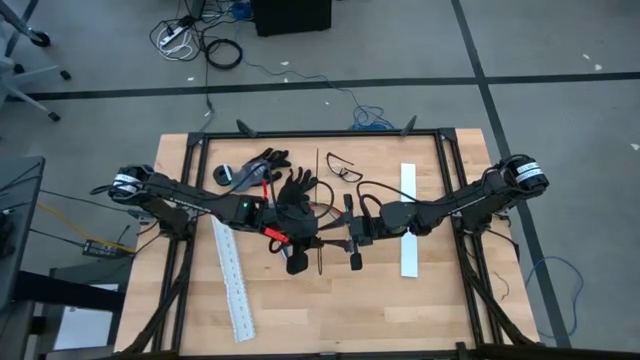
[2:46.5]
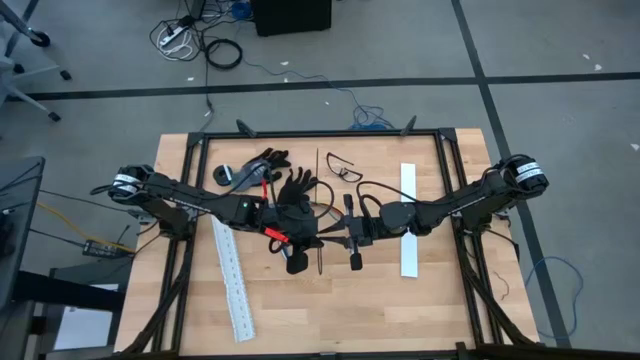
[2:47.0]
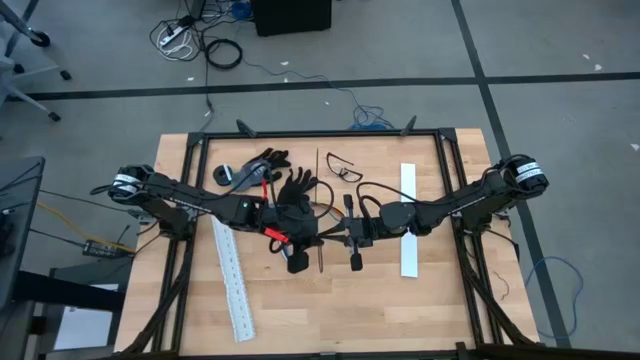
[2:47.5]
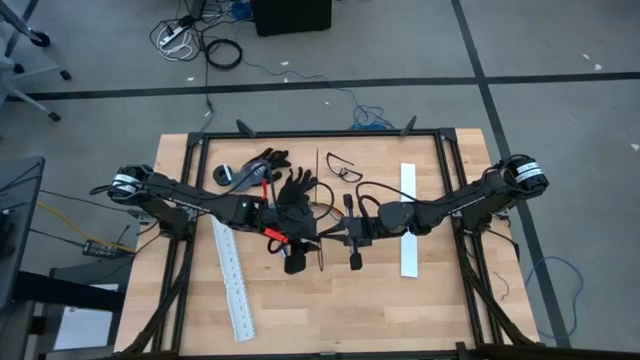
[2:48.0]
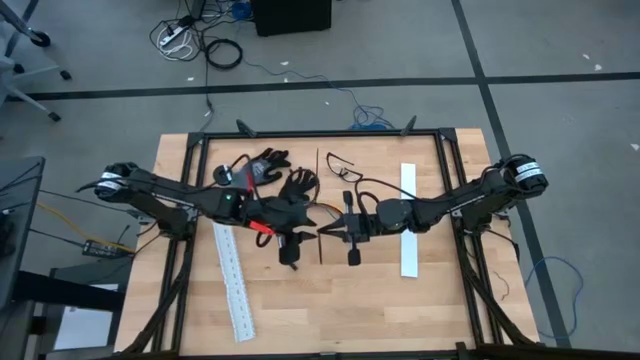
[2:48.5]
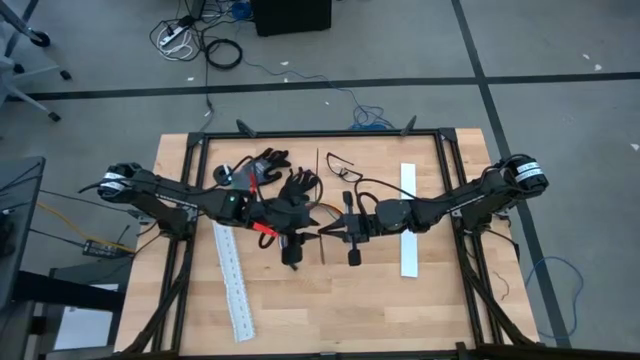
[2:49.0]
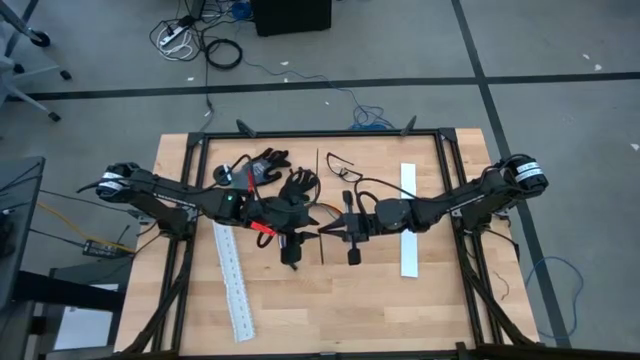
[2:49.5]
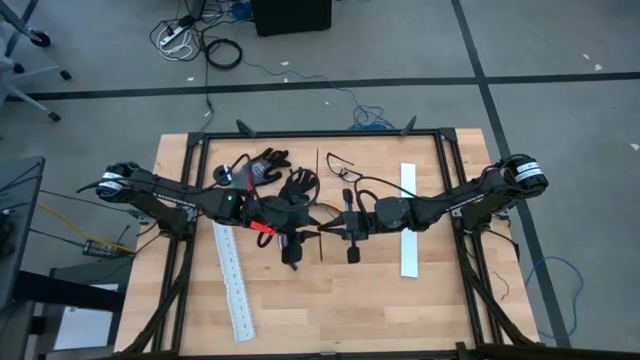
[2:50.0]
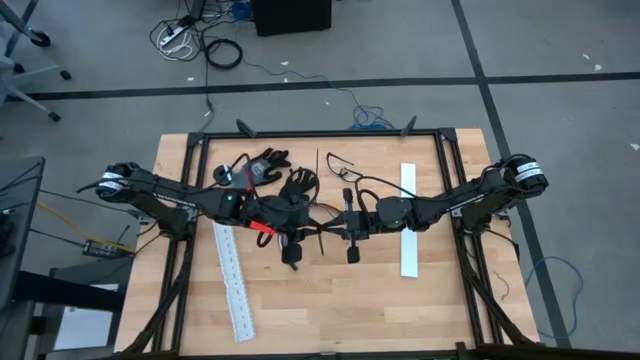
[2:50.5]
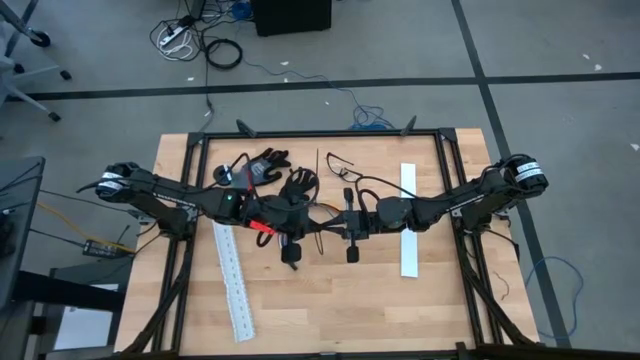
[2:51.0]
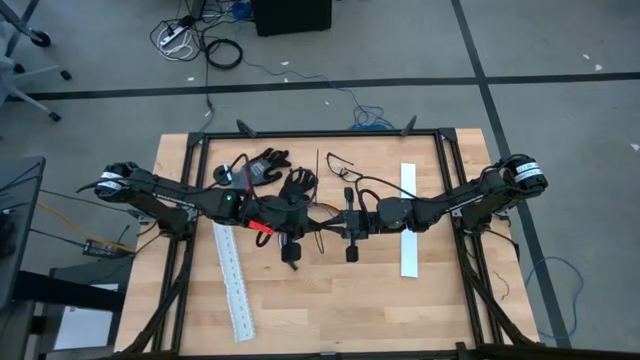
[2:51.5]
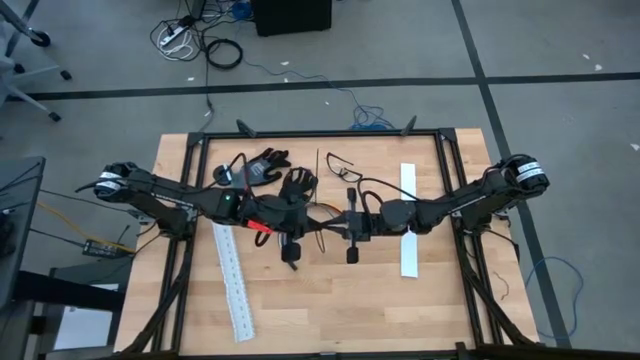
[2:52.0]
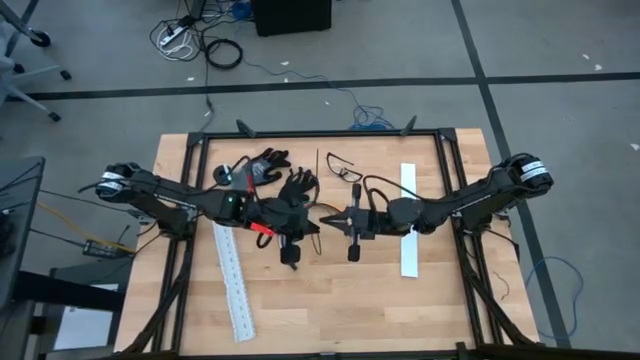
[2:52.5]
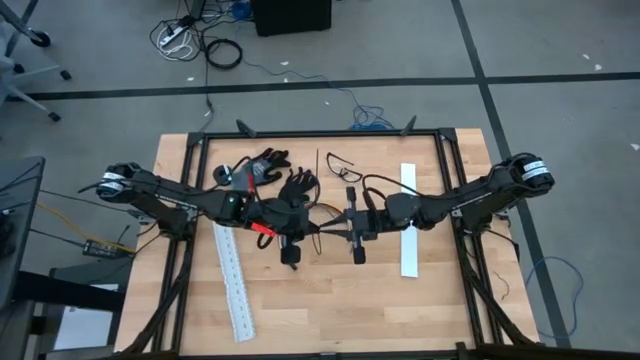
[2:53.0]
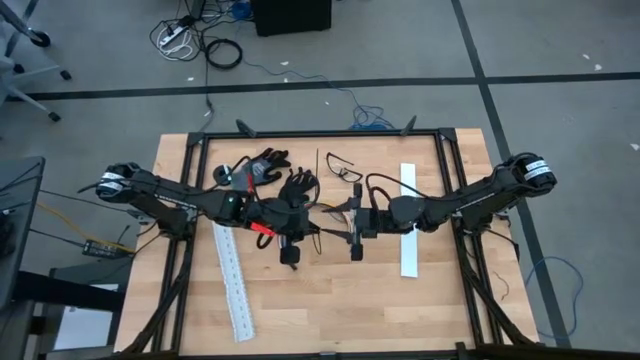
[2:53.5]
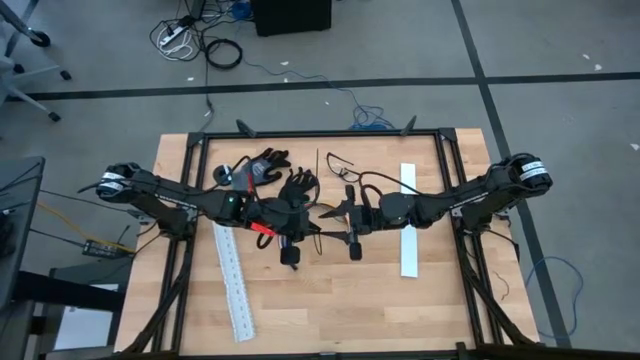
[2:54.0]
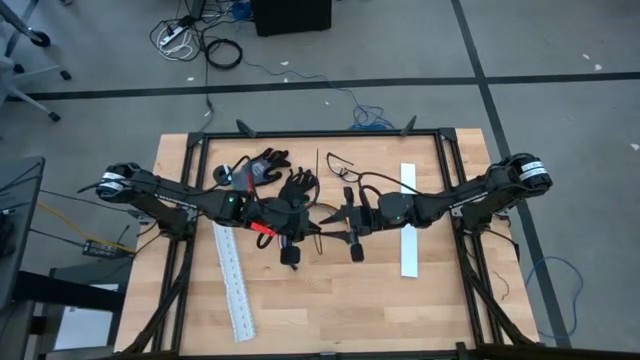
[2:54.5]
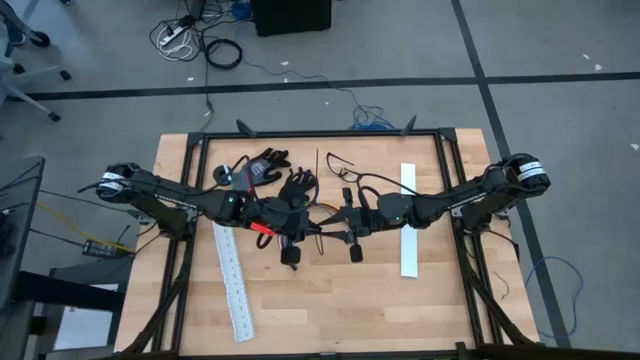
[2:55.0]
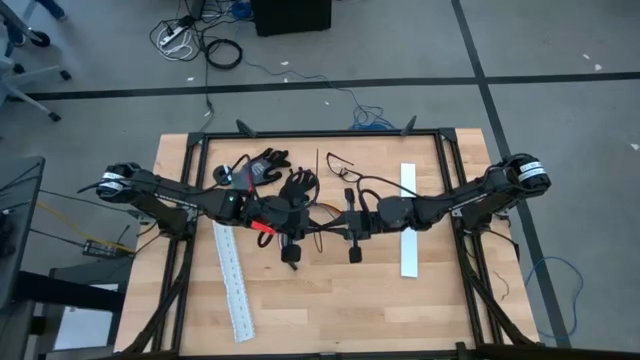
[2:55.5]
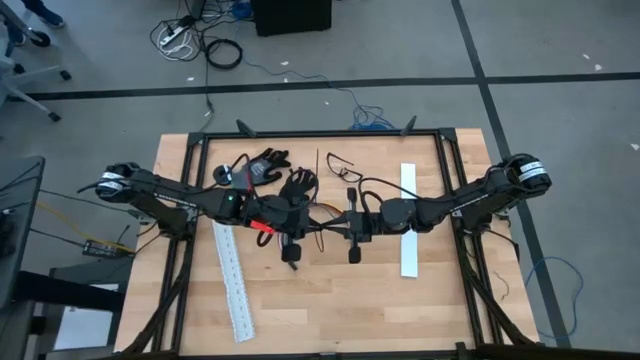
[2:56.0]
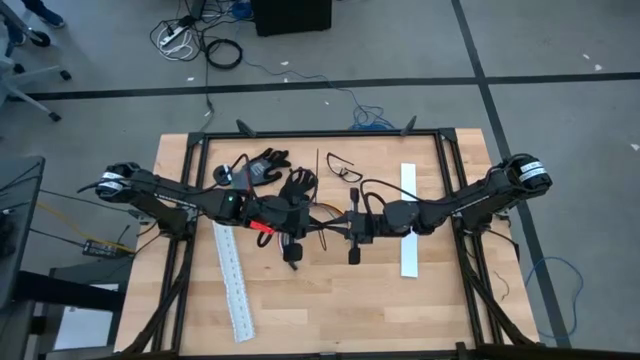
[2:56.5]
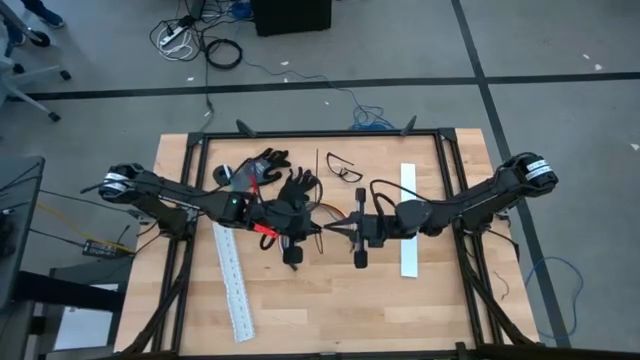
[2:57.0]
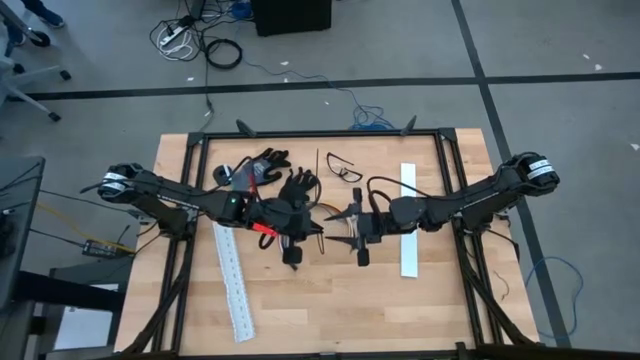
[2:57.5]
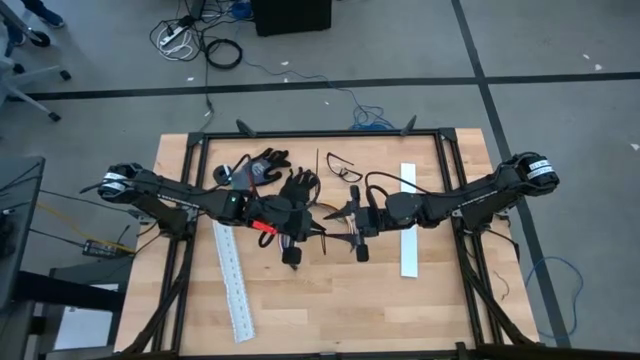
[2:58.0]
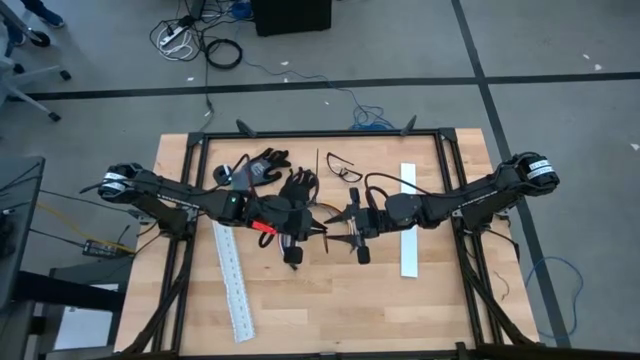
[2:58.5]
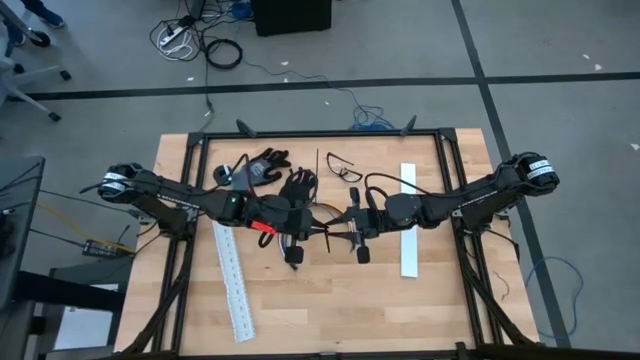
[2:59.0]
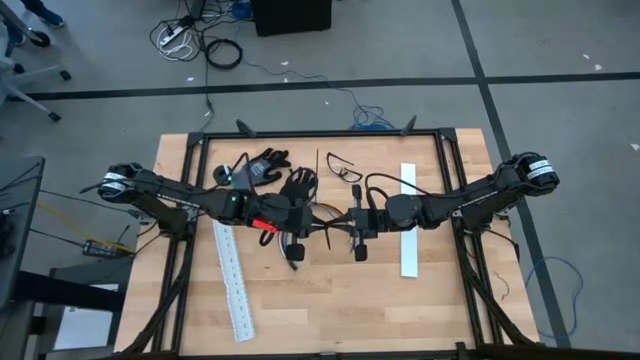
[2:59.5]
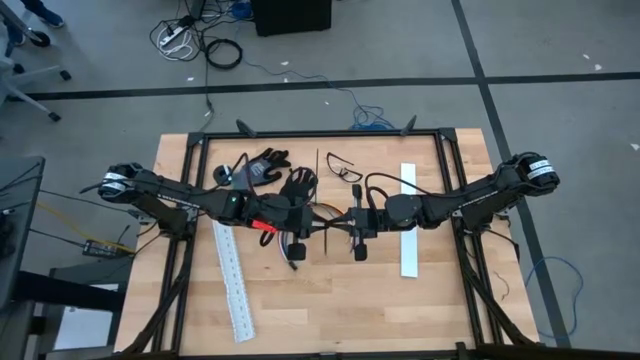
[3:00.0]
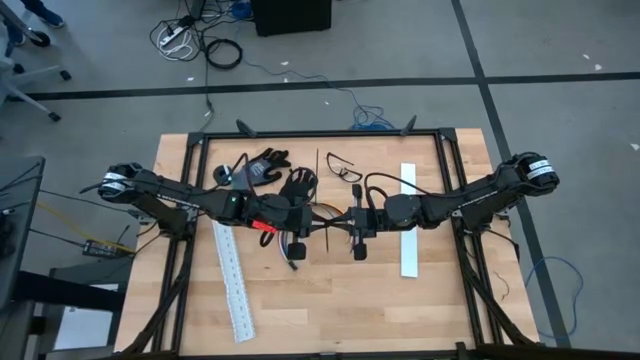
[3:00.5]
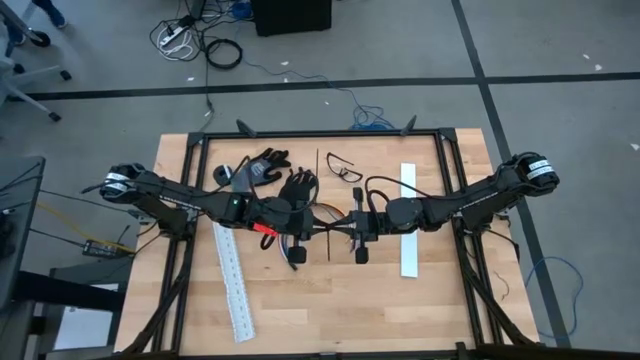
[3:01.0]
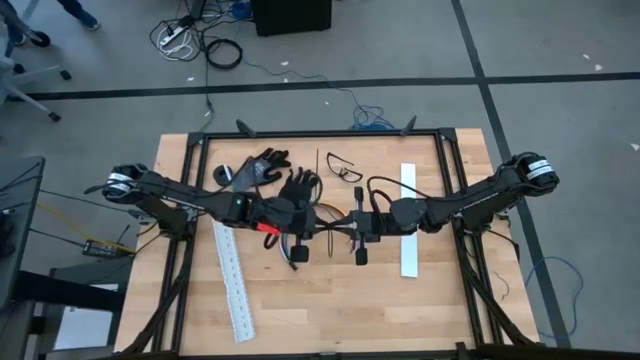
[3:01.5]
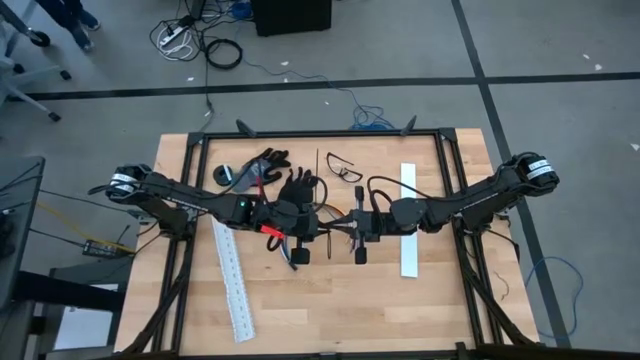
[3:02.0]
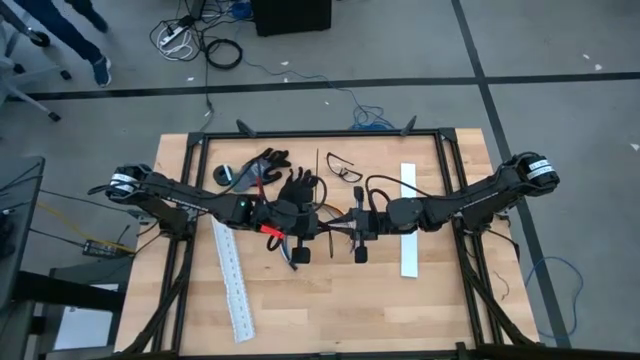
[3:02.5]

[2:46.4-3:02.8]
Task: Ziptie cables
Insert the black zip tie pointed tail end through the slot to form a loop
